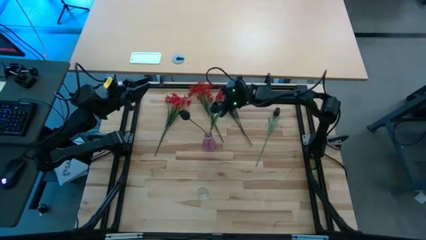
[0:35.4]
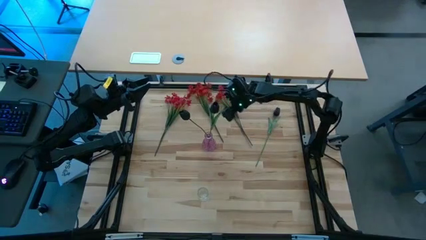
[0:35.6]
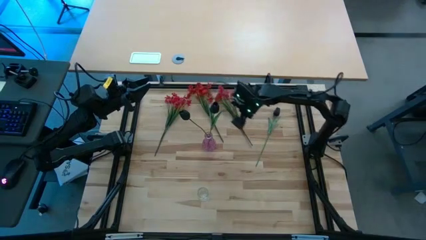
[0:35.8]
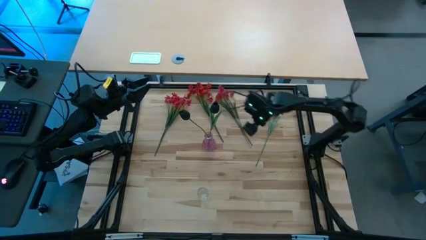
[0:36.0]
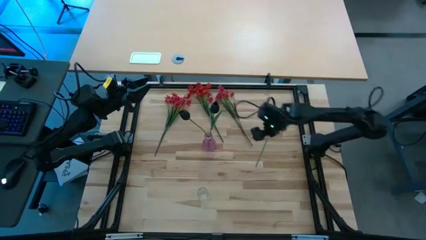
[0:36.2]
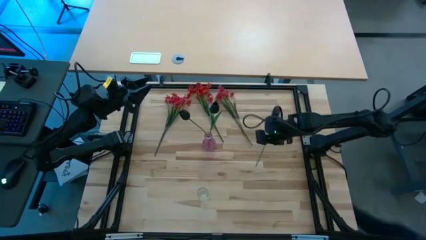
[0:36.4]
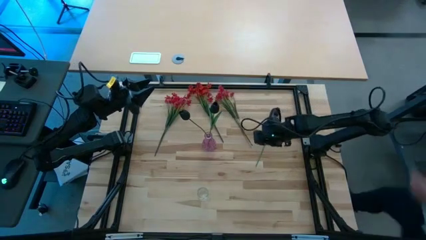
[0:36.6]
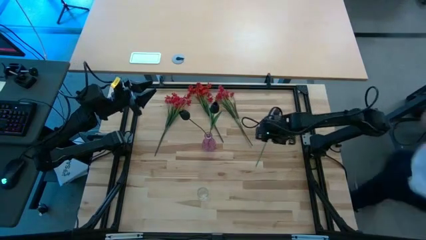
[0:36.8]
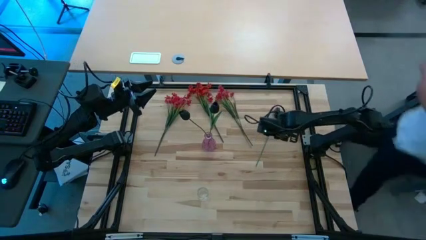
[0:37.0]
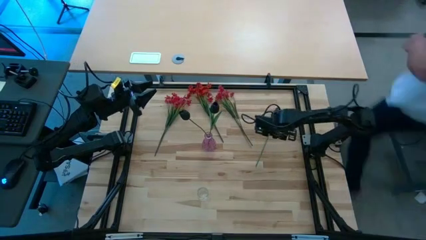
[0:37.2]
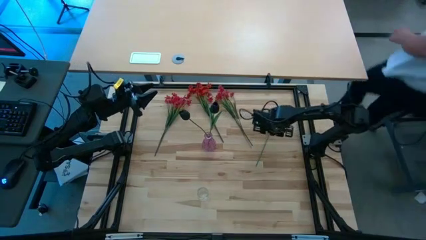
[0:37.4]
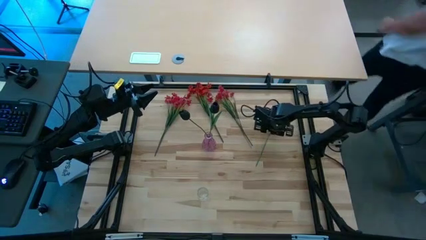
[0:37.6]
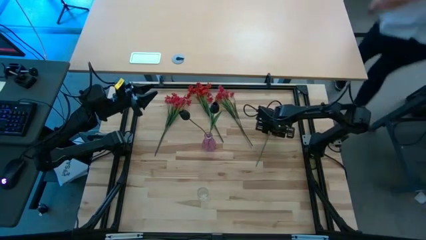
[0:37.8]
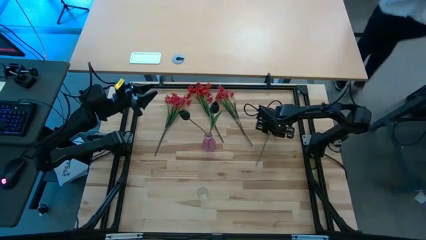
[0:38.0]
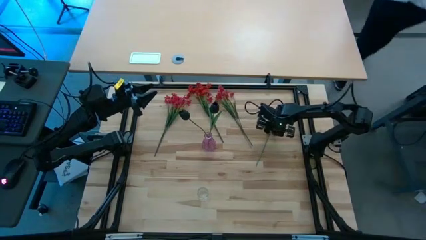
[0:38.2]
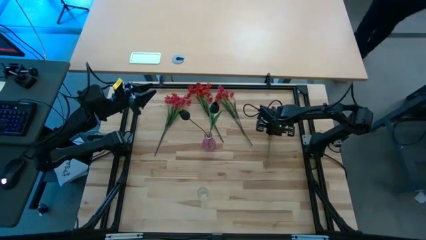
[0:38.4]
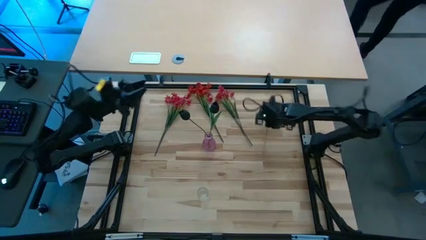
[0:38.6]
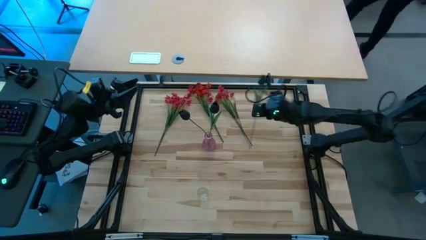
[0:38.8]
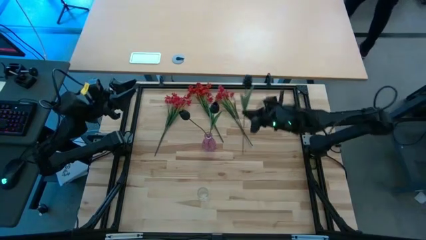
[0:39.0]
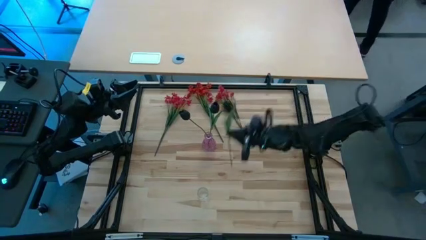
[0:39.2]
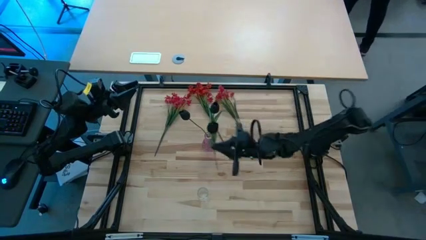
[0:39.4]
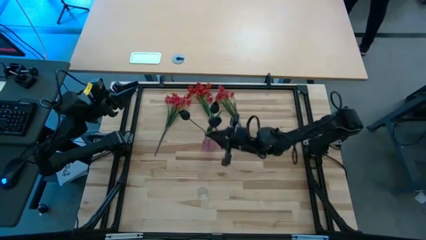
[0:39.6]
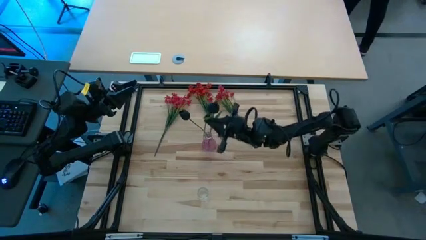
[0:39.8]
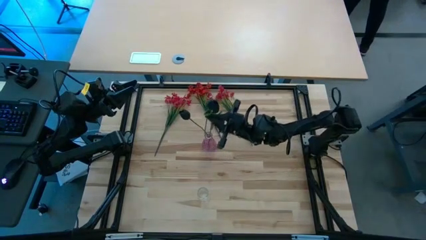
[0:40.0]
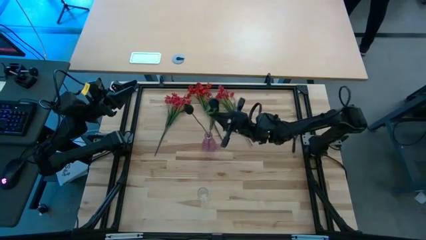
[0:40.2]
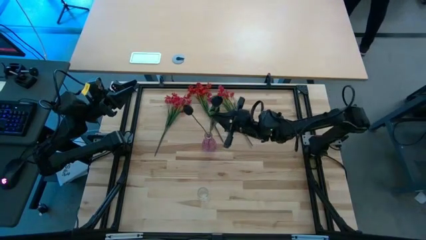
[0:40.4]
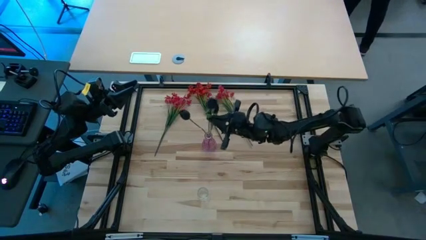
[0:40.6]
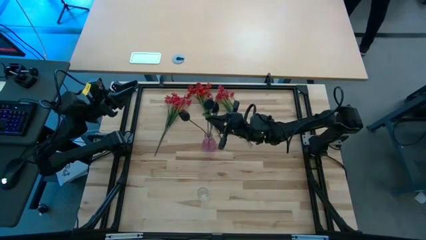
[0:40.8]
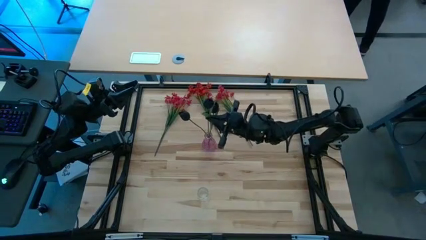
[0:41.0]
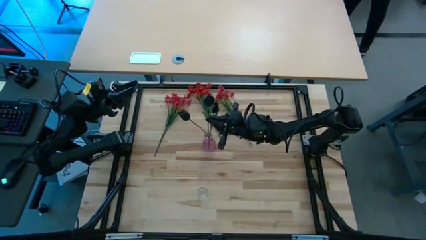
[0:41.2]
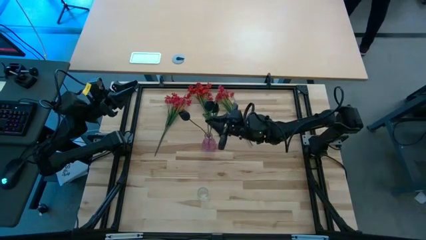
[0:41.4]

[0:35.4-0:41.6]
Task: Sort flowers into vase by color
Put the black tulip into the pink vase

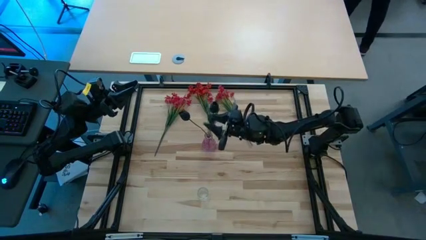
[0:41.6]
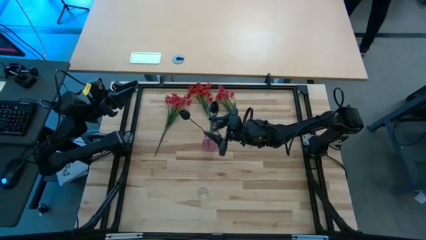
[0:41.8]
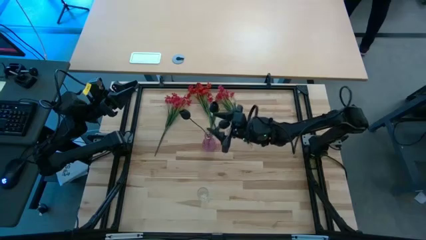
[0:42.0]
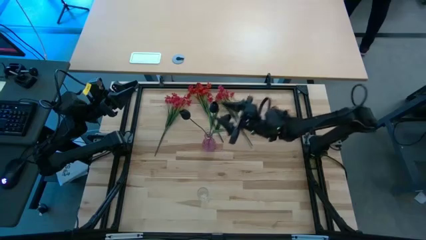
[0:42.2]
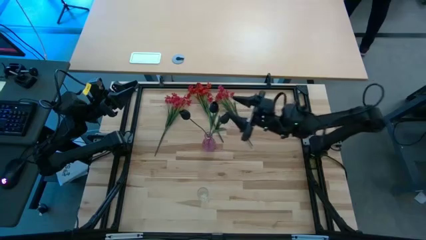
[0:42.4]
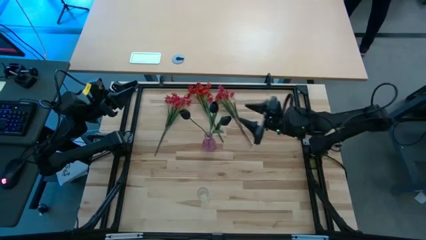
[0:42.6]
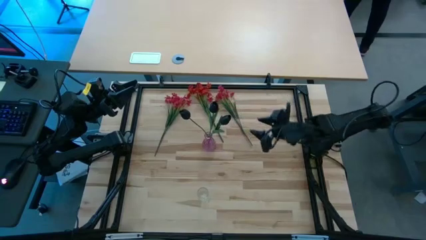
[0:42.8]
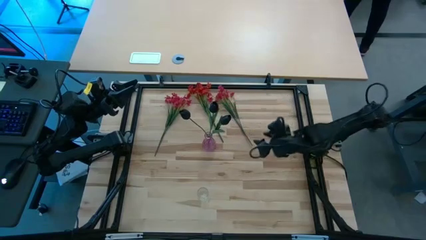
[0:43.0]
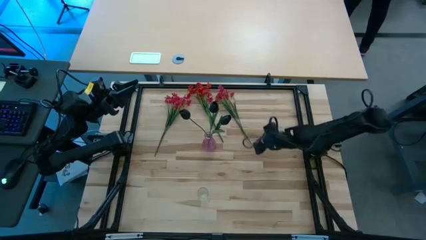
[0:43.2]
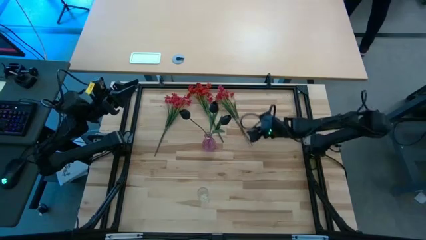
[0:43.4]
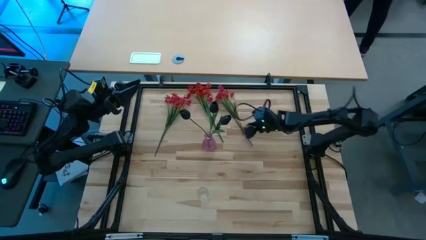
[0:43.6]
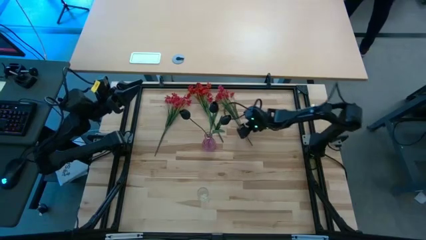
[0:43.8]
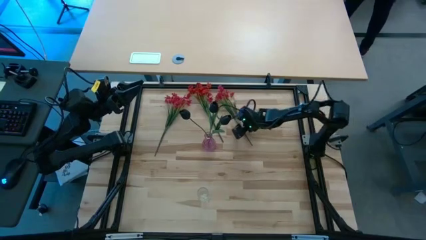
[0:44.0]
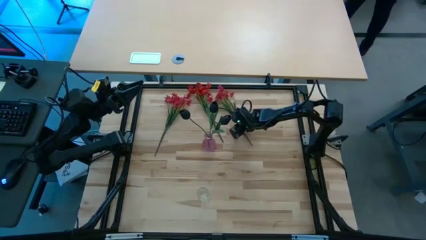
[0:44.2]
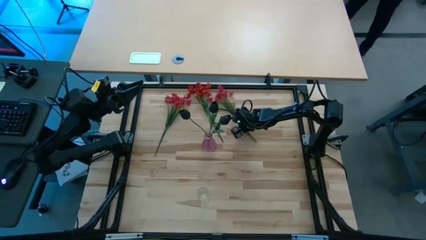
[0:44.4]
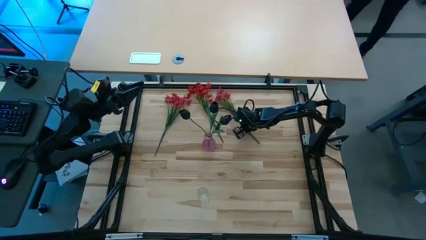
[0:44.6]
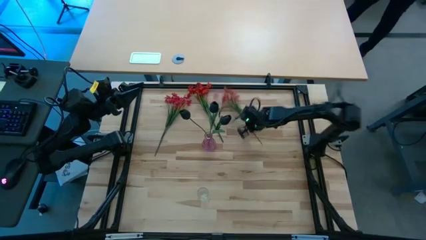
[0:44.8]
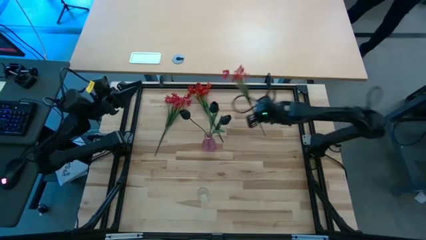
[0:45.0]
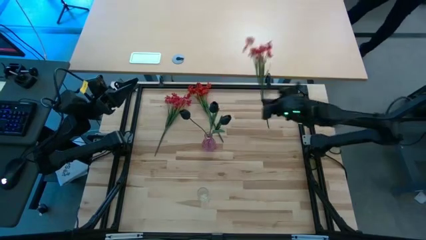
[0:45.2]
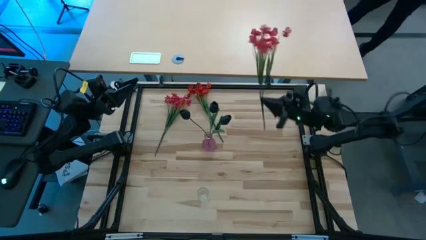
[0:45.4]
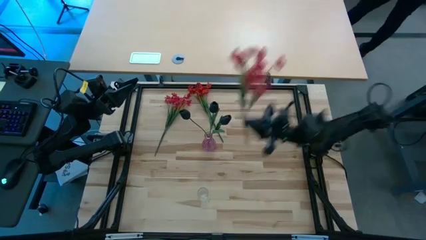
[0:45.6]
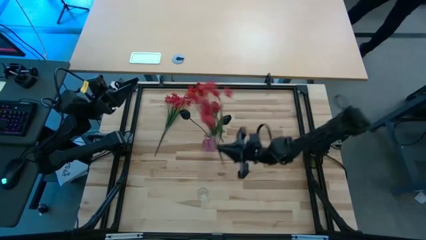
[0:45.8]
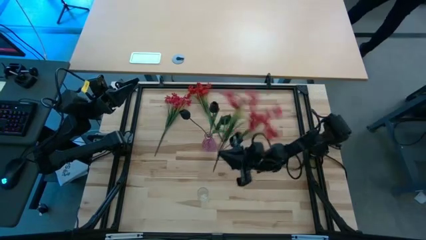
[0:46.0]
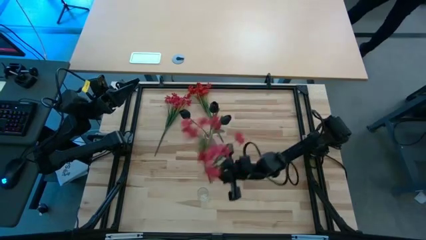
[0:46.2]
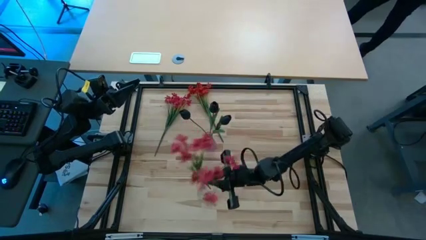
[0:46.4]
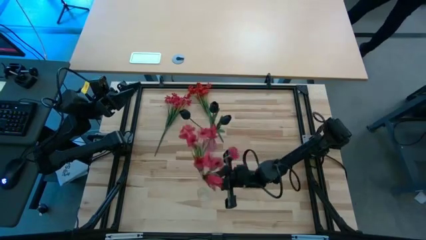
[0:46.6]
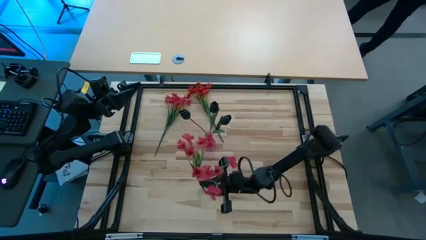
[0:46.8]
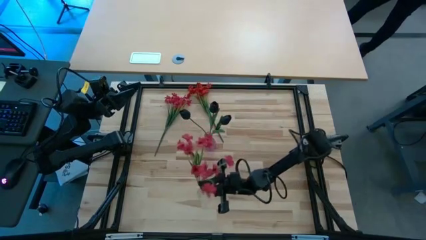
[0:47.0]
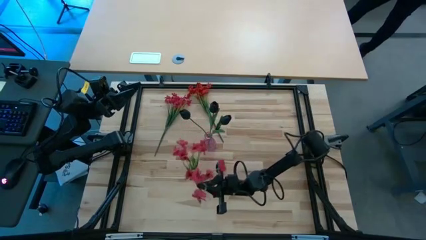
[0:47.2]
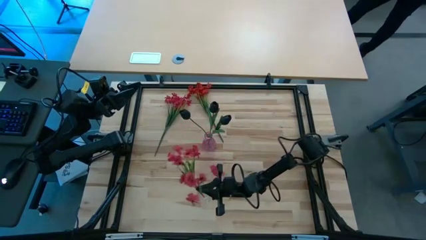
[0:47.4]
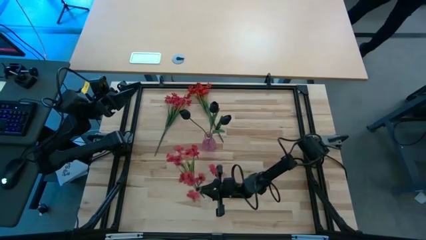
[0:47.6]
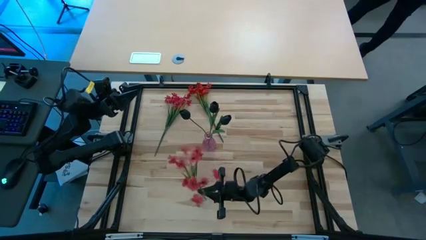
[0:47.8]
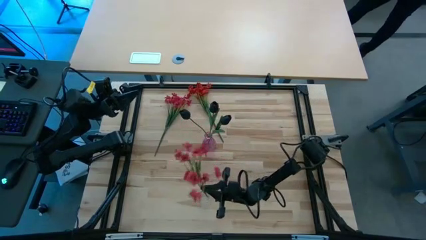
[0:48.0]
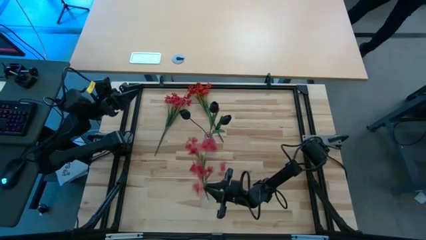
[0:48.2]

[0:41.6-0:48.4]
Put the top right red flowers into the transparent vase

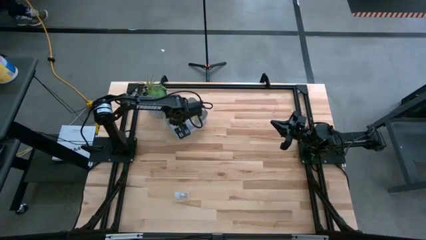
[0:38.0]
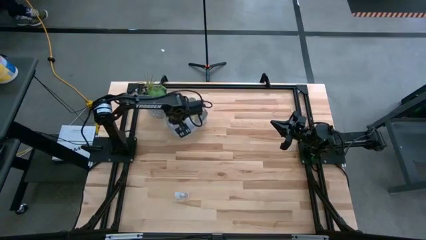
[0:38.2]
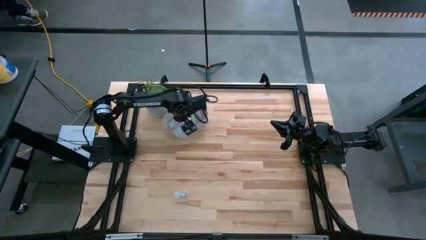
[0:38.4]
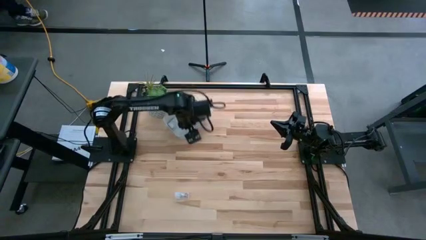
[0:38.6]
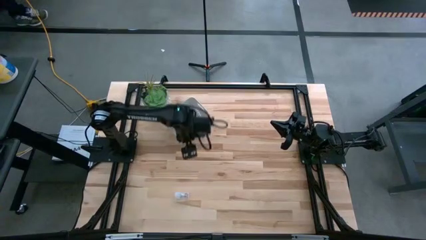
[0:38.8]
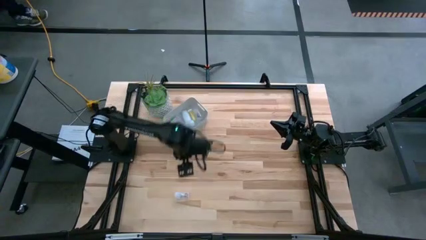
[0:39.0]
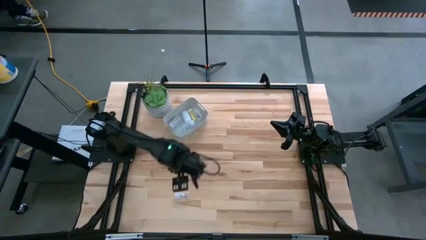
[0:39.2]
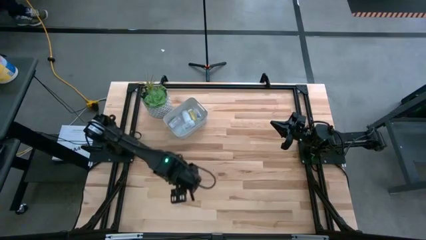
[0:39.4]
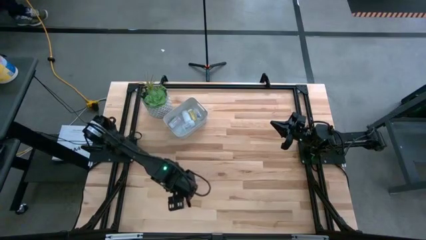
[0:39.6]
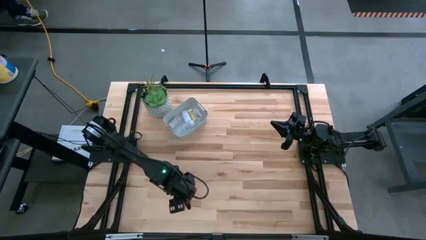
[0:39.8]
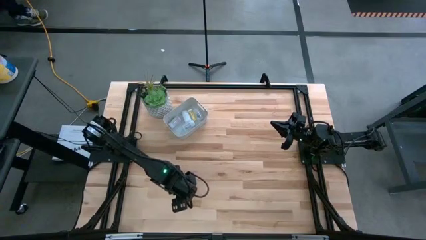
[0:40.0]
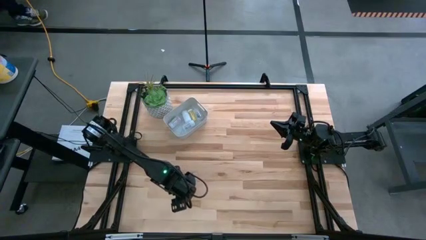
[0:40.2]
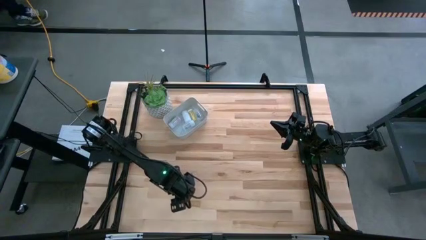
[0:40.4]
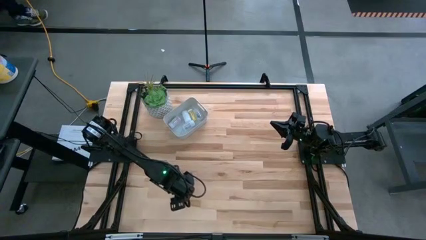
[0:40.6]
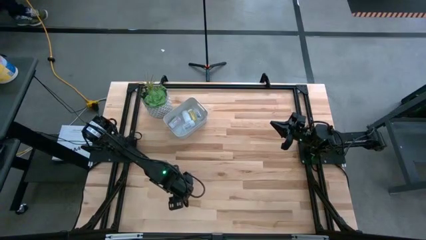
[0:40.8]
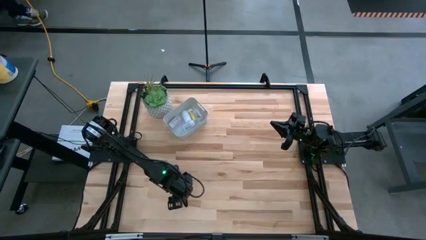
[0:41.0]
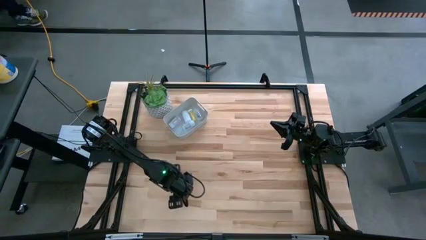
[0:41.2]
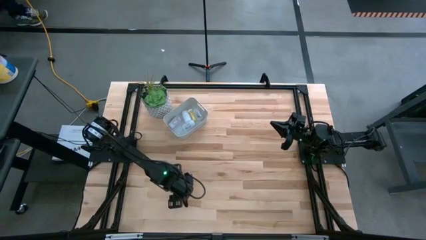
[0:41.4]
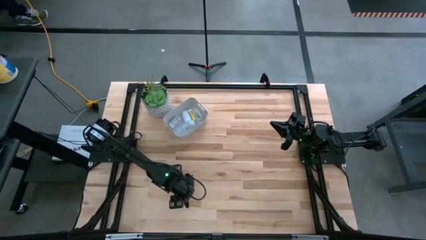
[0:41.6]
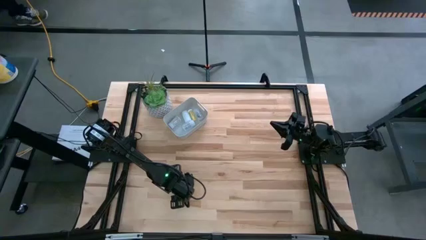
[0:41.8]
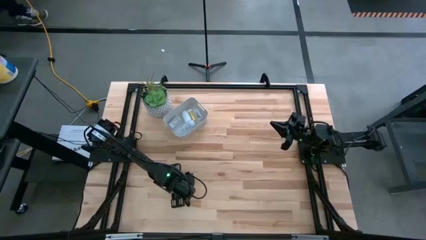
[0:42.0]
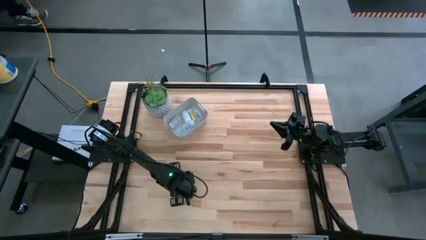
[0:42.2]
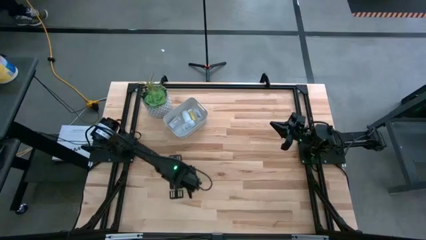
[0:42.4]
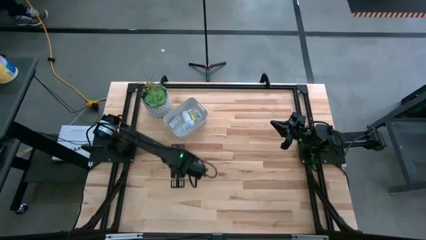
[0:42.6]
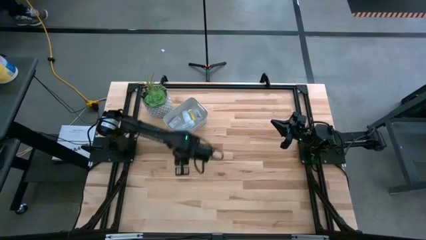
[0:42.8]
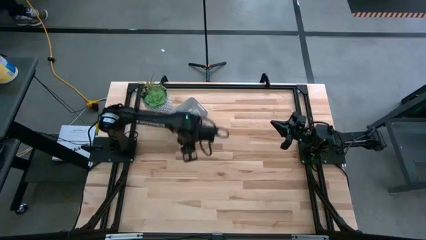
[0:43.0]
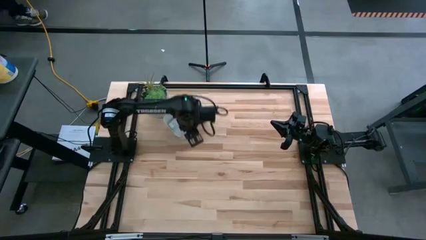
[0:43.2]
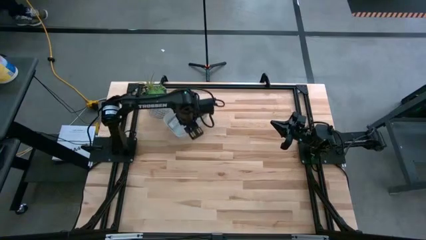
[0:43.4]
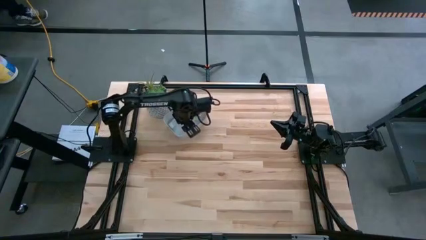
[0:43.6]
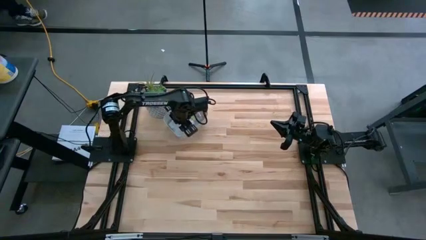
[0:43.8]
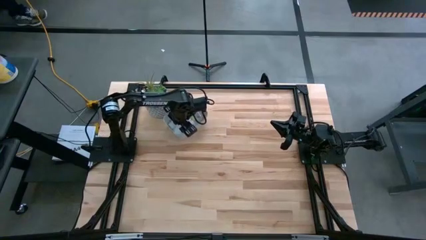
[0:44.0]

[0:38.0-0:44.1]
Task: Pick and place pill bottles into a basket
Put the transparent pill bottle into the bin
